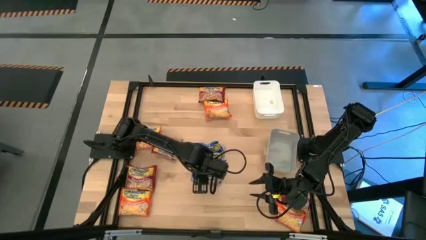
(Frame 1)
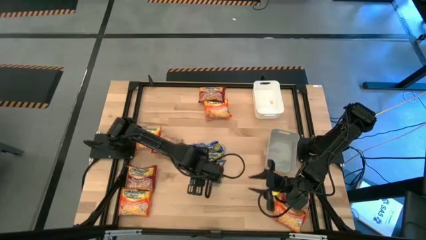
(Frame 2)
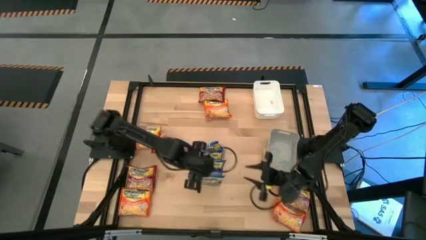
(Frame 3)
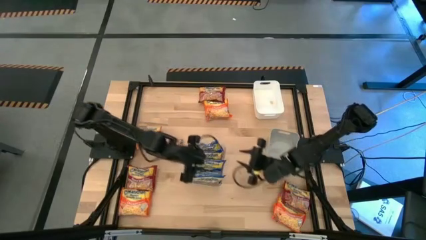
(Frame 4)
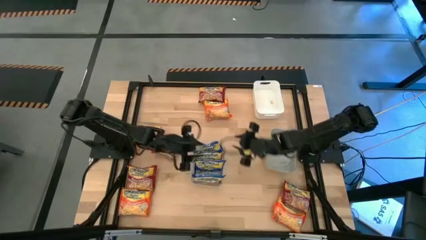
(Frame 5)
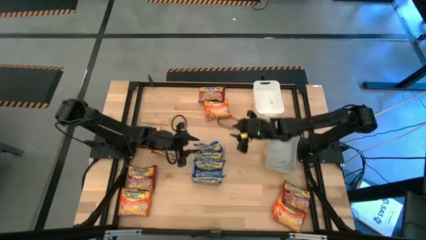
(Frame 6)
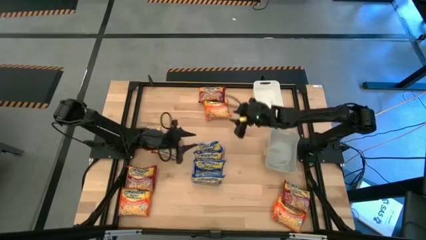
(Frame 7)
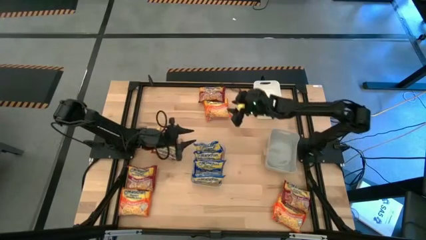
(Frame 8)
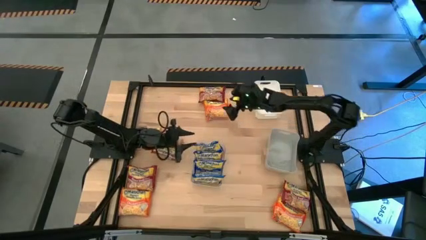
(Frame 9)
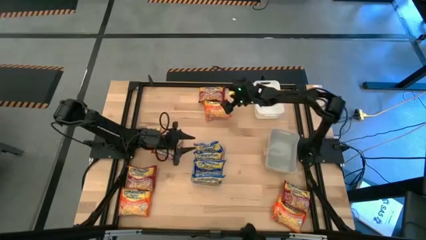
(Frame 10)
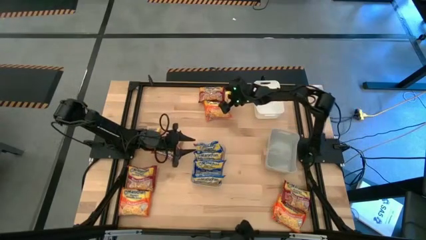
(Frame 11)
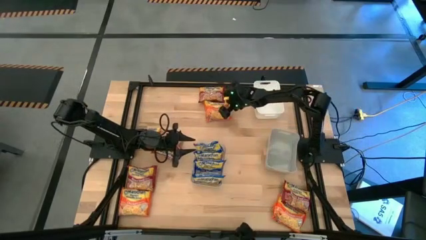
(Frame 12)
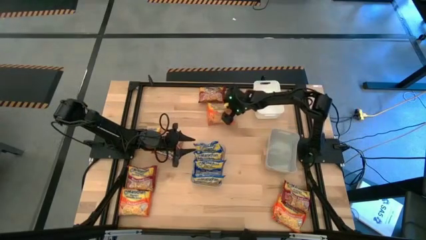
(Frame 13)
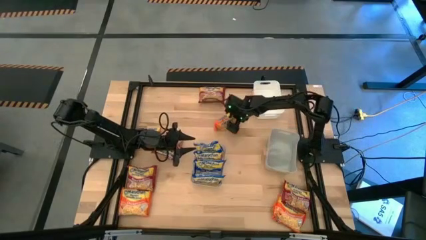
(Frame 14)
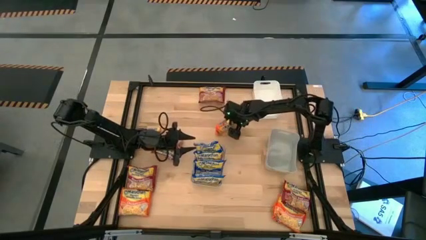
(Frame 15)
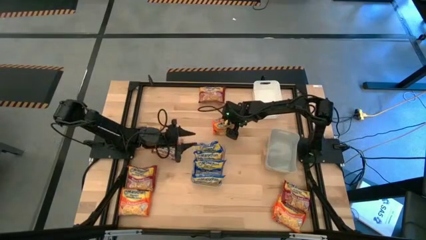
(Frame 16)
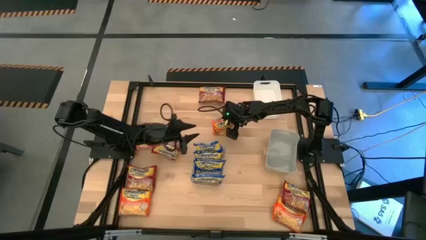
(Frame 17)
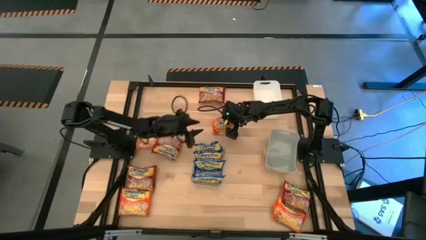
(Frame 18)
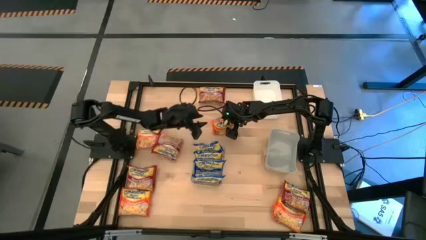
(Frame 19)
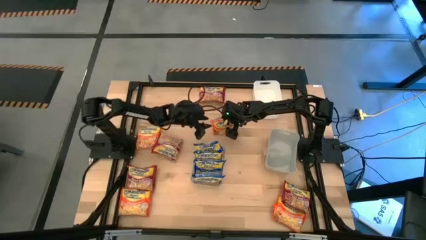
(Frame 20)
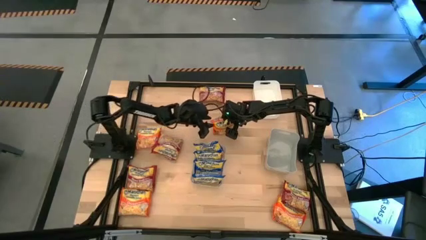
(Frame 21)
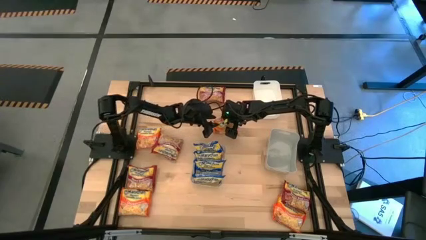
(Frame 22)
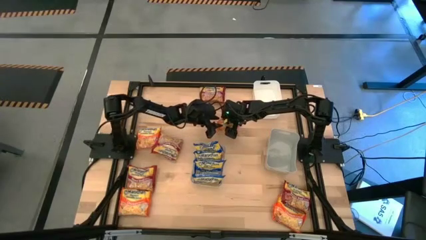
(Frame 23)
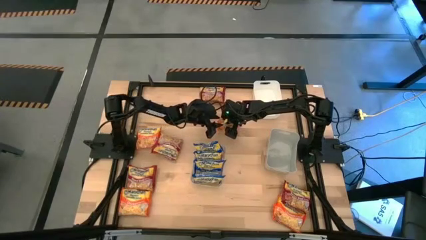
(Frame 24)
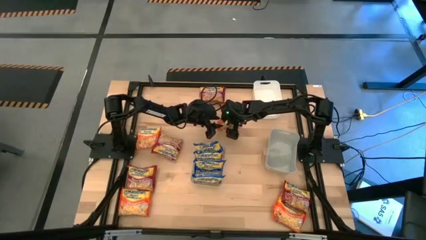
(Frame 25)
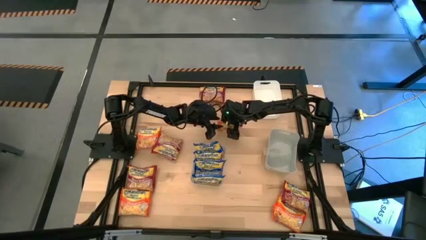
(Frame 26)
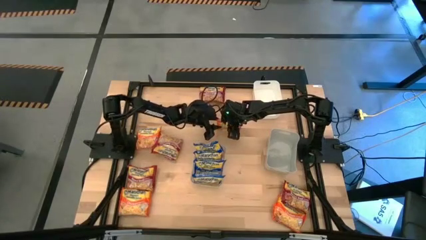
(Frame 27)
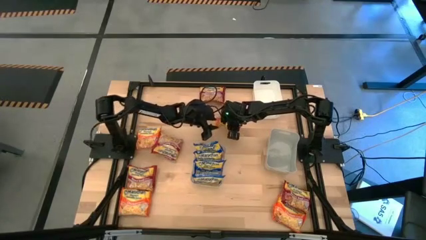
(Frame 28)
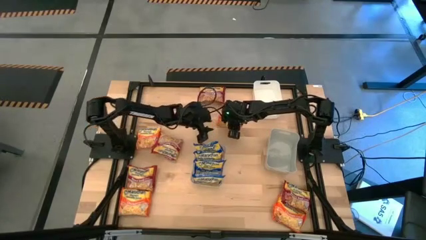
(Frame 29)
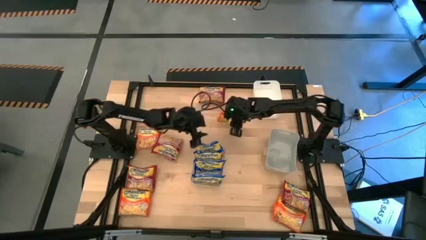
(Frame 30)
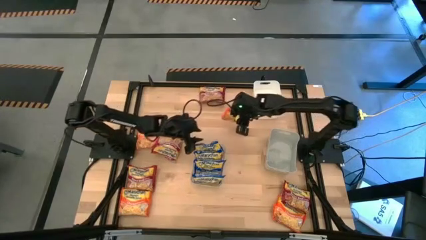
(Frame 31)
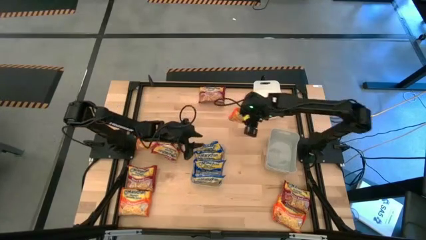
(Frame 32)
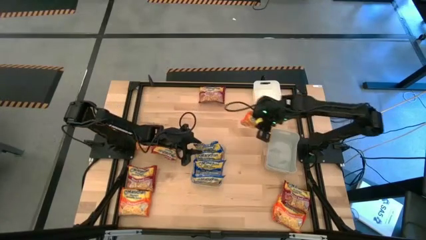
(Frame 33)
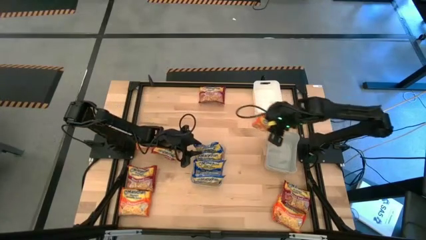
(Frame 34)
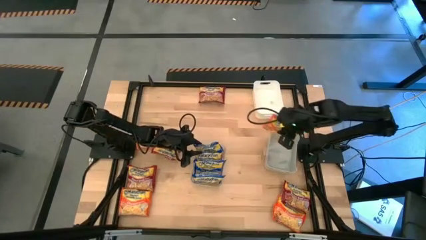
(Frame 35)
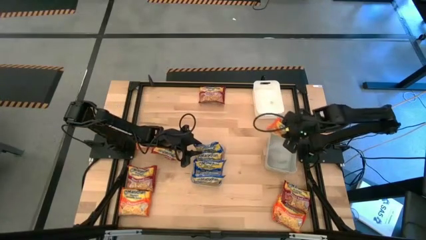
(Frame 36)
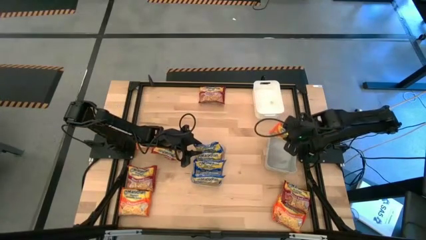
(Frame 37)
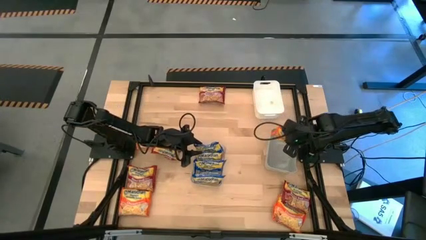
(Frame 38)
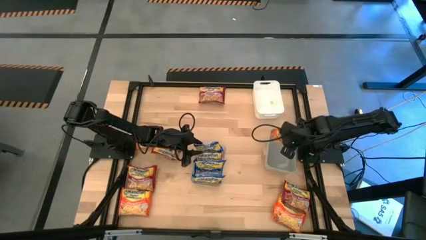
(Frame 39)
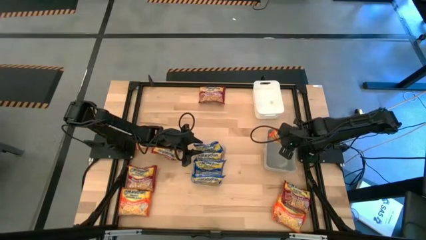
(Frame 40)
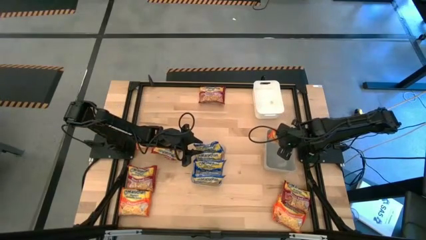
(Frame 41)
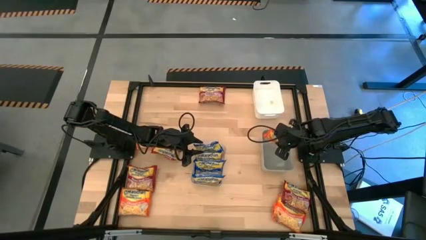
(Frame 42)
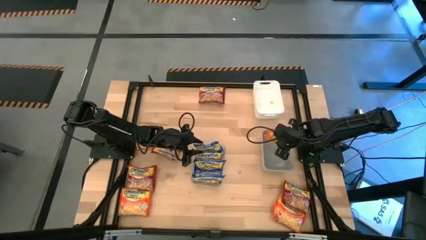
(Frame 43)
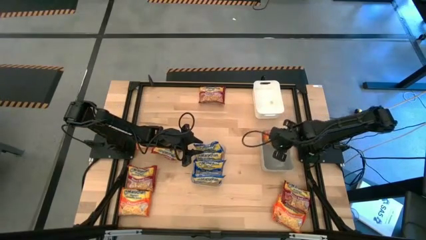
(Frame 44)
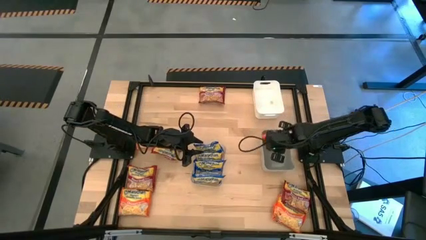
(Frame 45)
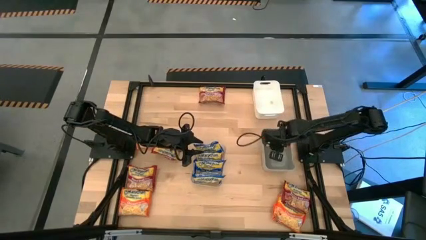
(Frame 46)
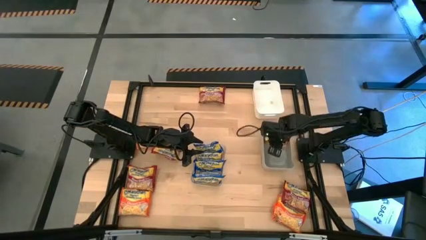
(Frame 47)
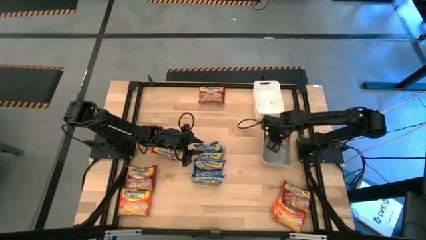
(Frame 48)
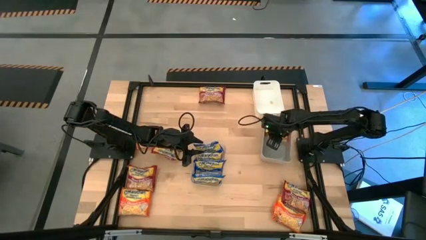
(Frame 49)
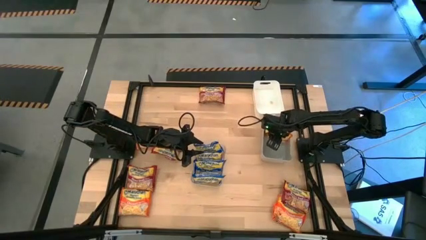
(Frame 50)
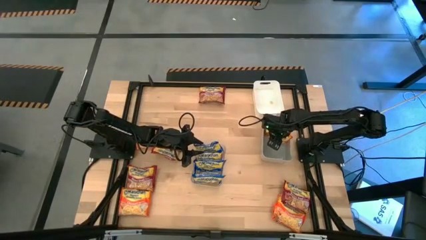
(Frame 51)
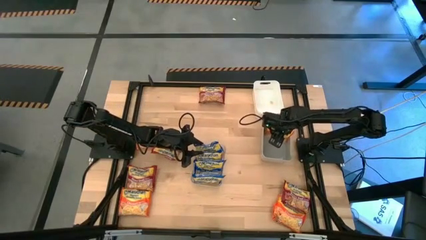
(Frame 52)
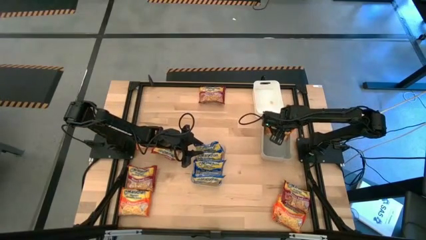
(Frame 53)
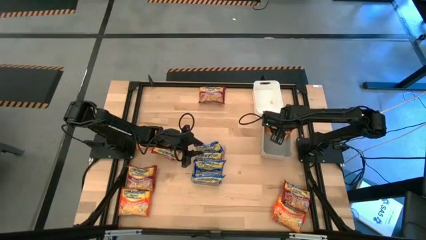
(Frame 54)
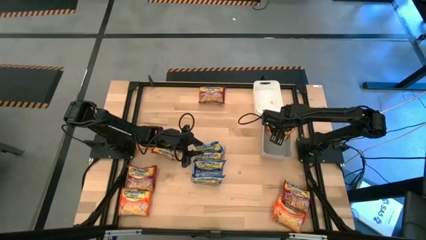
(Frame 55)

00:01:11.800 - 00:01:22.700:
Task: Sort Maruchan noodles
Put the orange noodle pack into the gray bin
